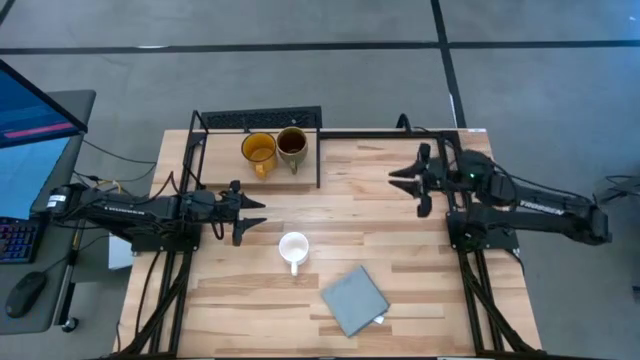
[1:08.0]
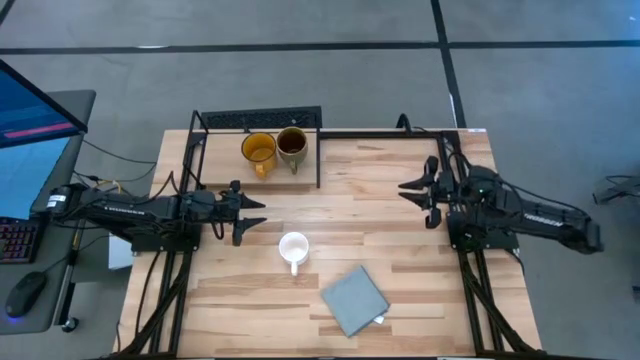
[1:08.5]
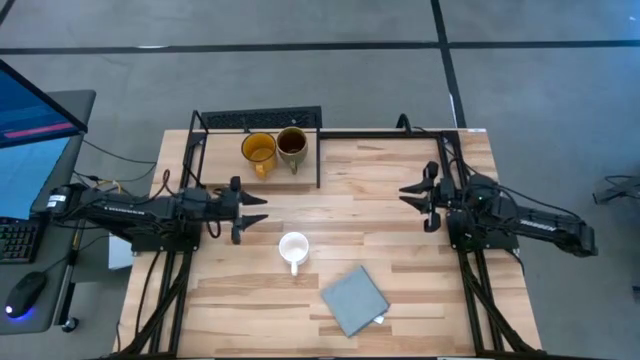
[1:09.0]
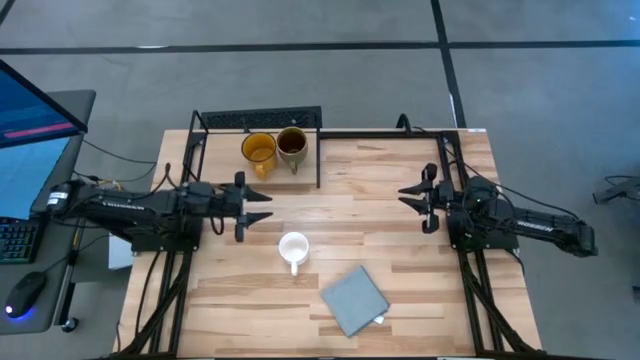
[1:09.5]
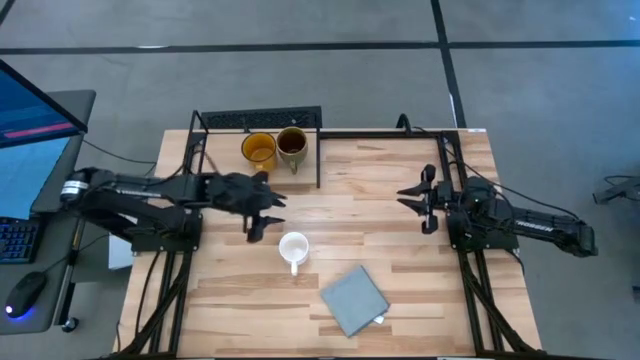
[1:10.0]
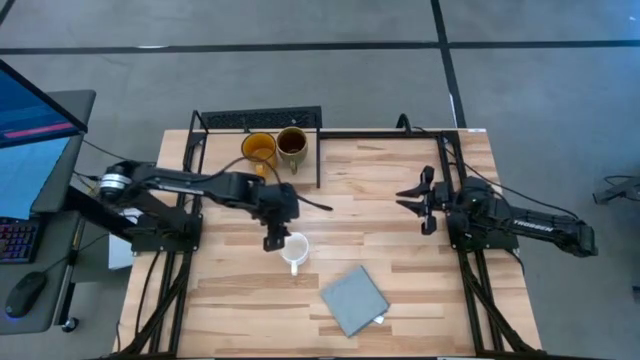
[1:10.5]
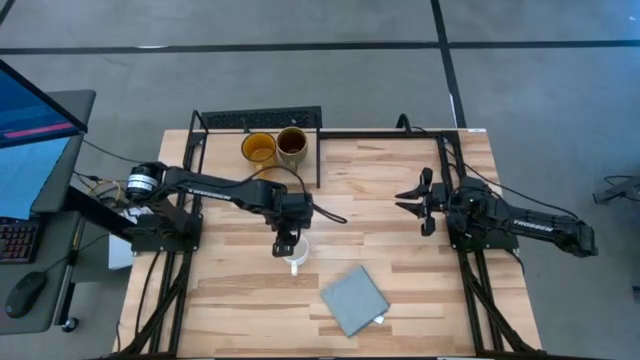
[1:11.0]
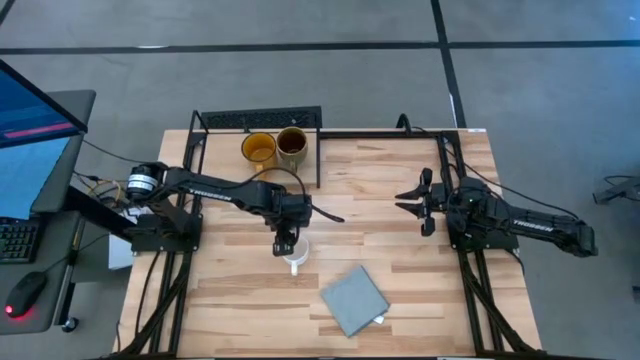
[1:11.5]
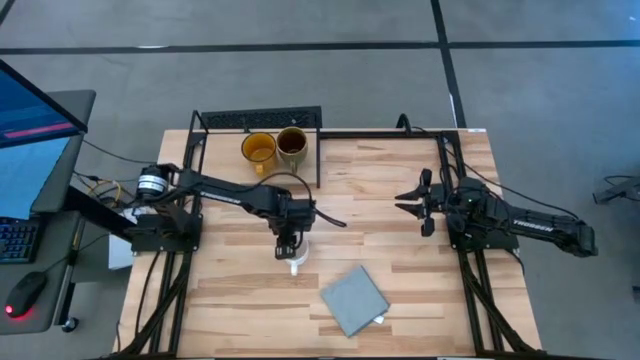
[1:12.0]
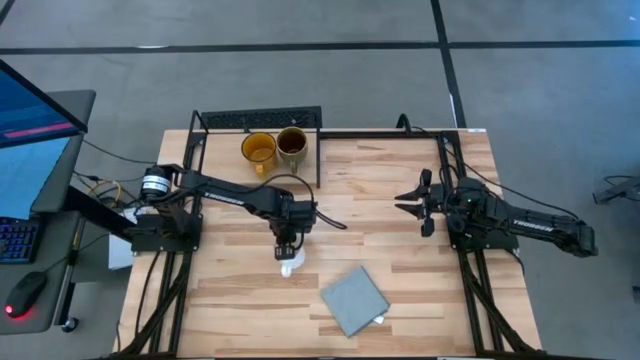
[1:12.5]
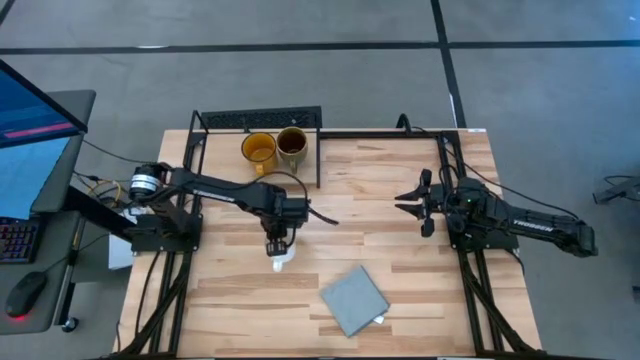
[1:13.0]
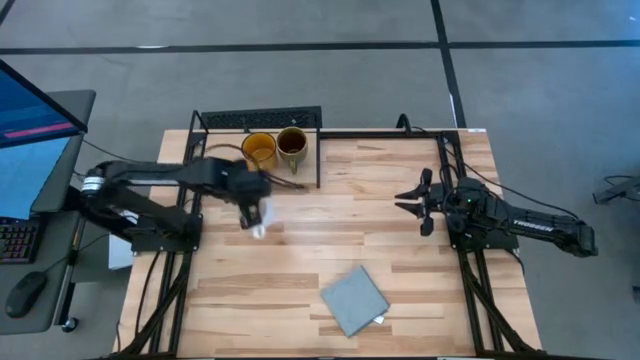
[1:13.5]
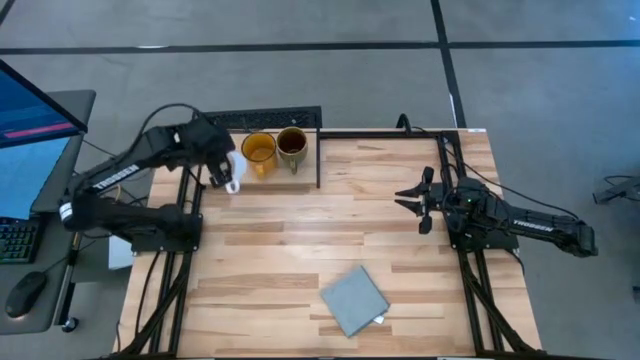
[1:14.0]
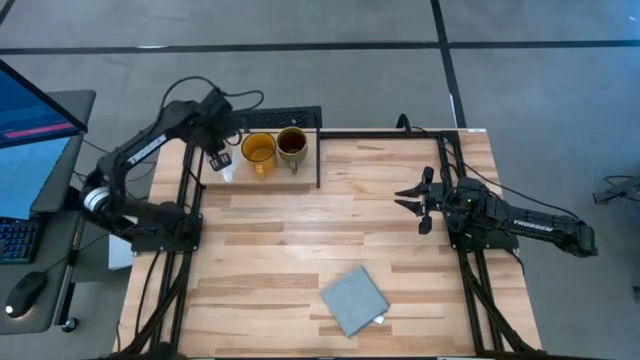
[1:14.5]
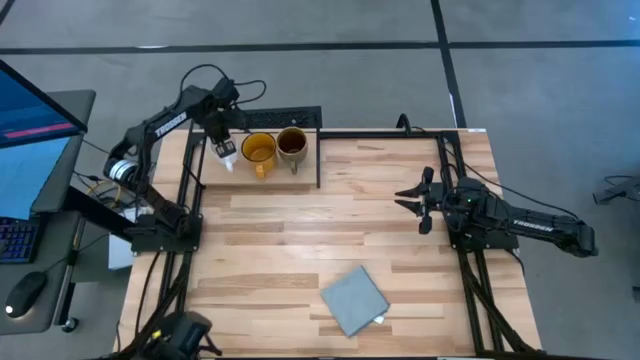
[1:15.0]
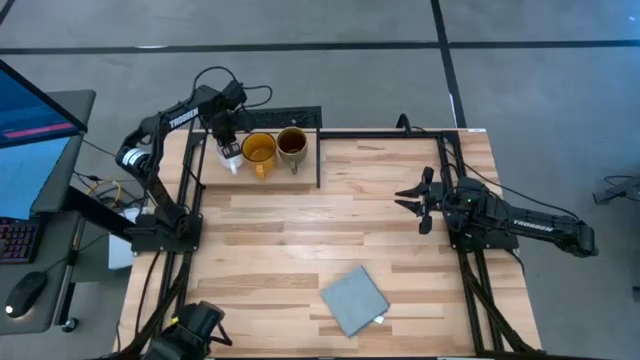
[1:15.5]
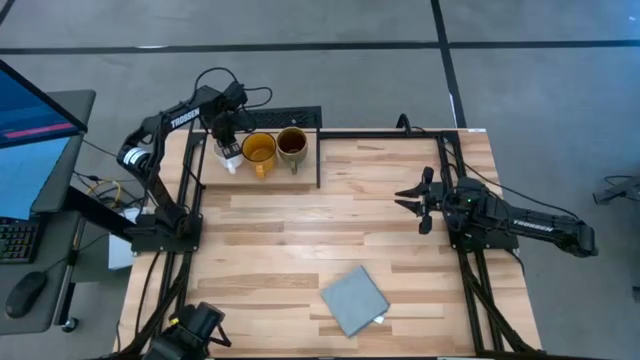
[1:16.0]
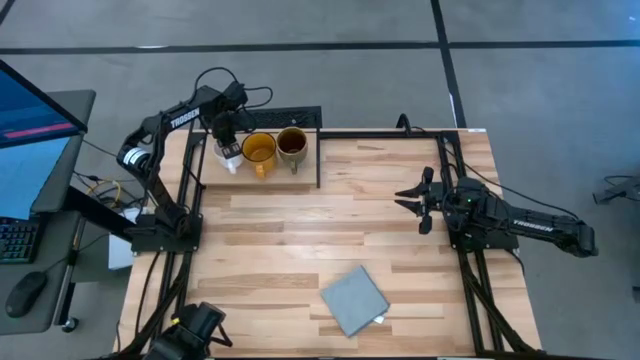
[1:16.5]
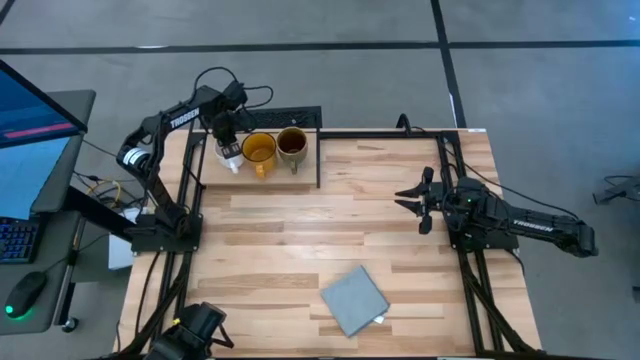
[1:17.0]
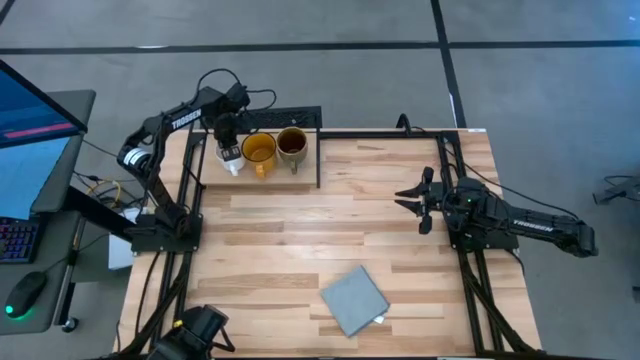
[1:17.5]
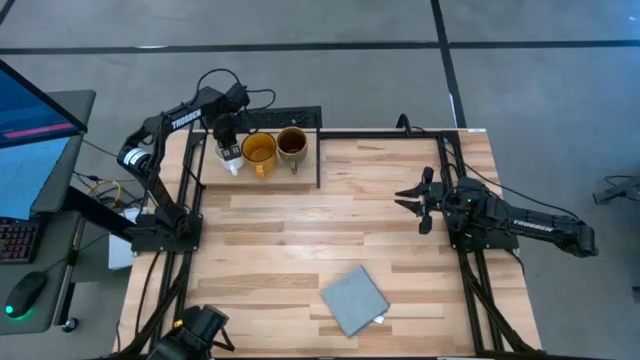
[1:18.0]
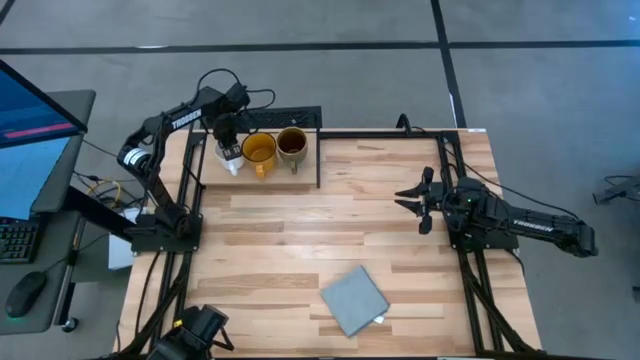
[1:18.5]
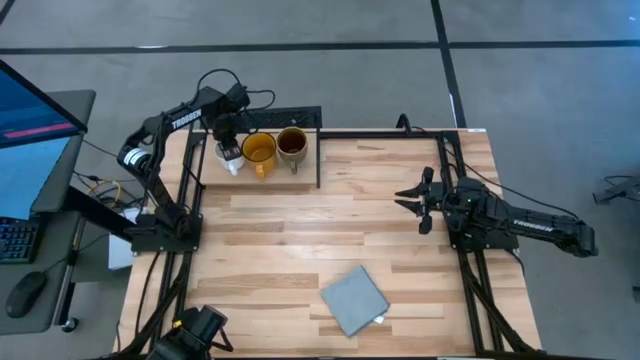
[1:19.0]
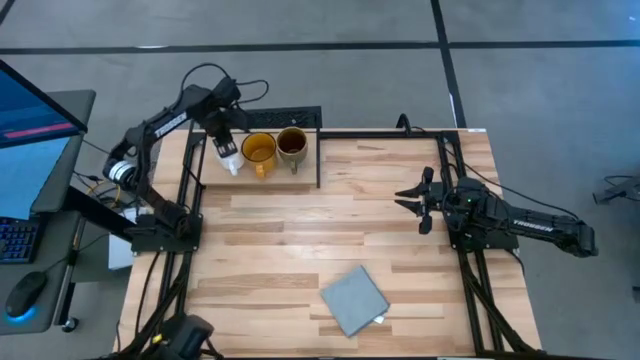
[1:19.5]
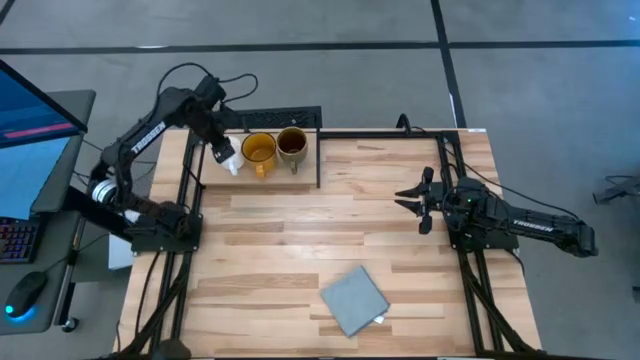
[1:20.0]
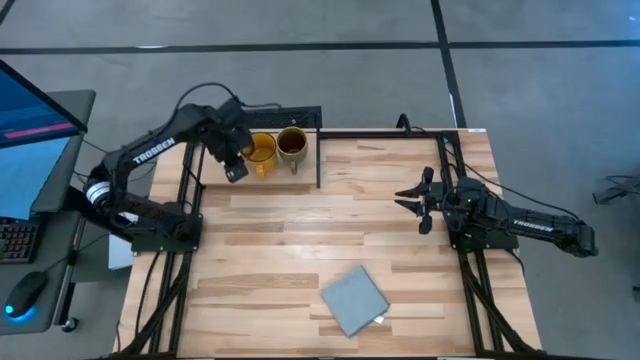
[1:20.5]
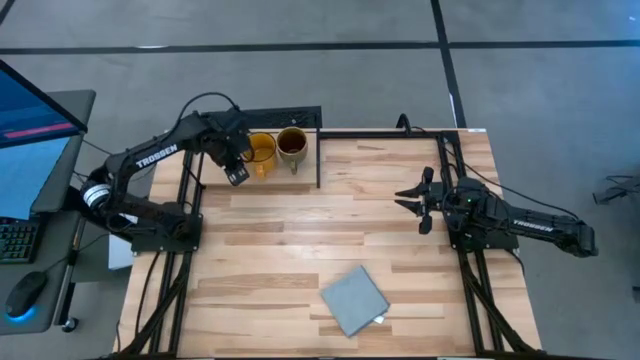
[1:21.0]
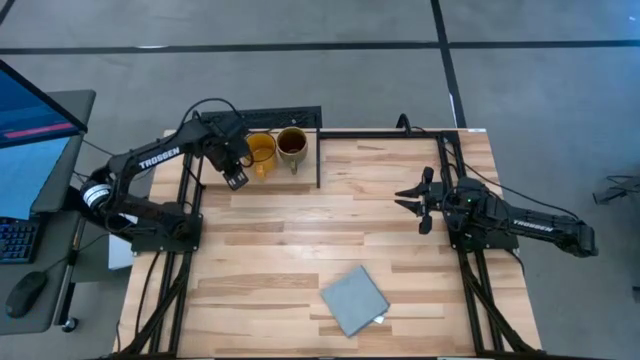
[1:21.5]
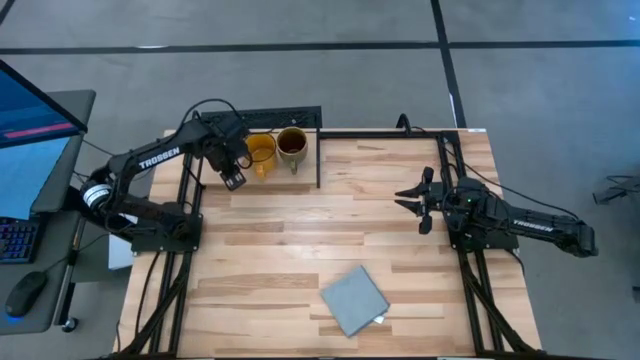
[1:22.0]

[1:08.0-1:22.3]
Task: Stack small to large cups/mugs on shelf
Put the white mug on the shelf

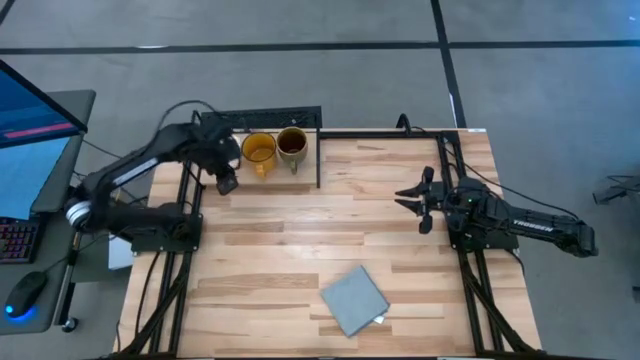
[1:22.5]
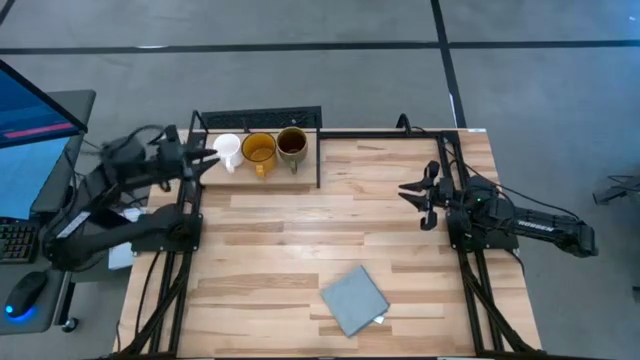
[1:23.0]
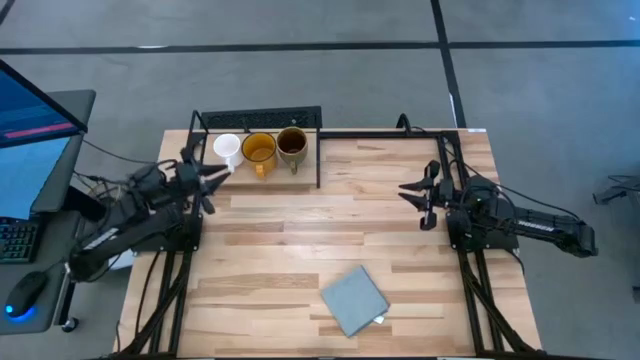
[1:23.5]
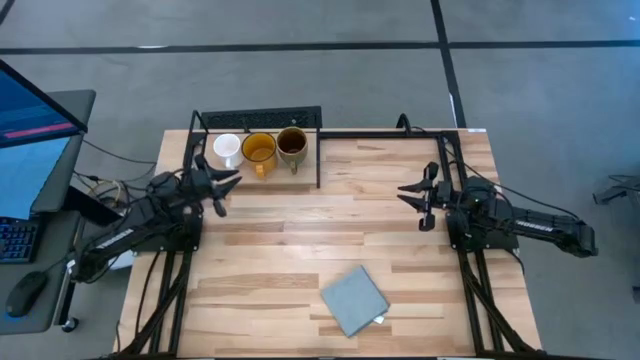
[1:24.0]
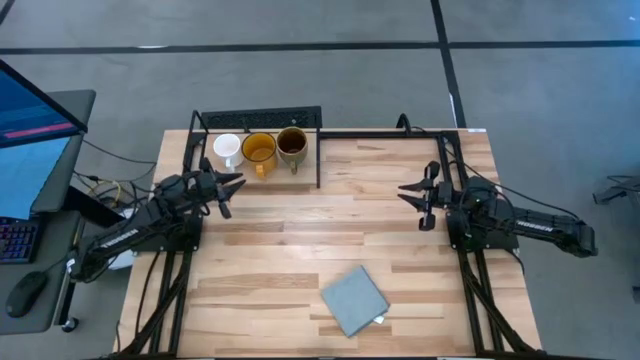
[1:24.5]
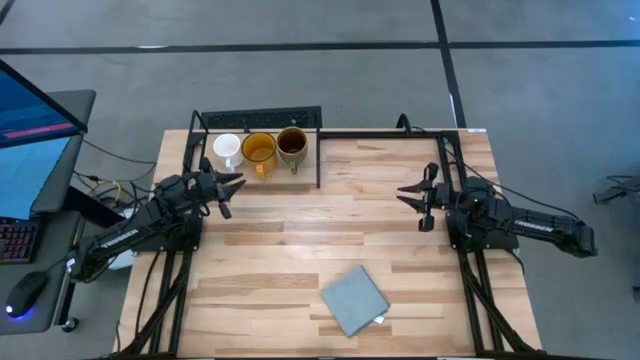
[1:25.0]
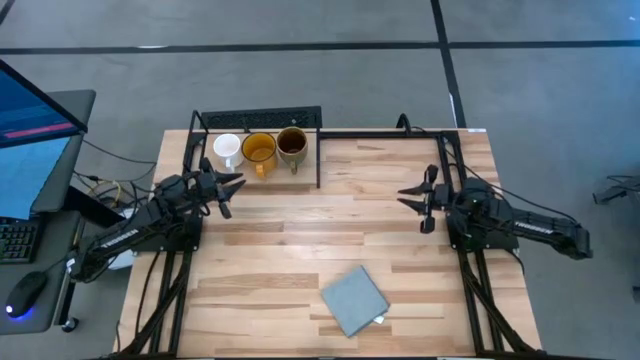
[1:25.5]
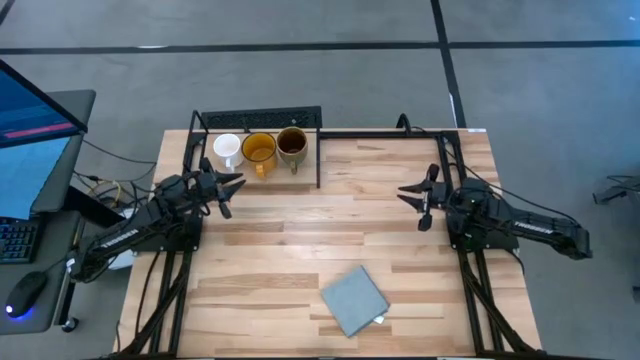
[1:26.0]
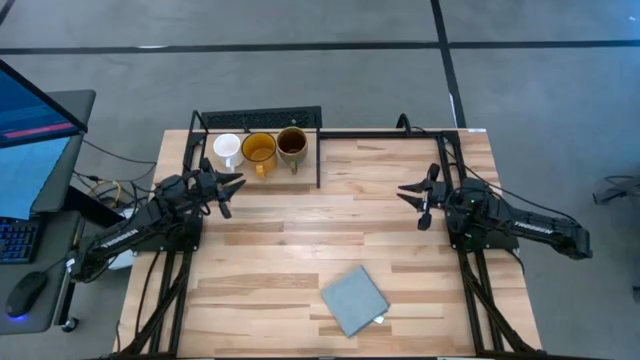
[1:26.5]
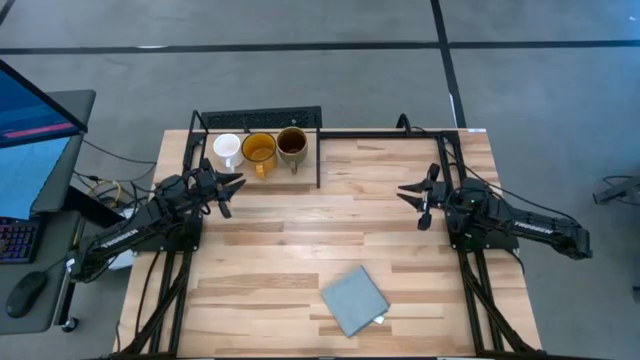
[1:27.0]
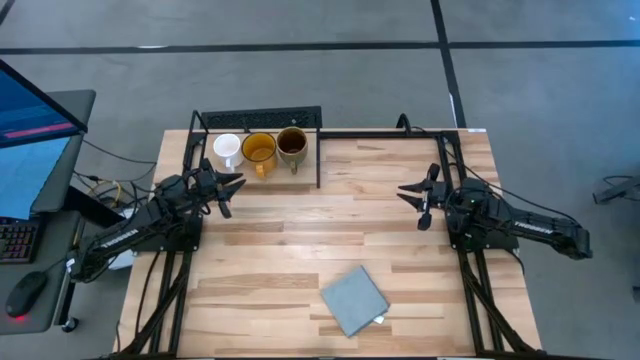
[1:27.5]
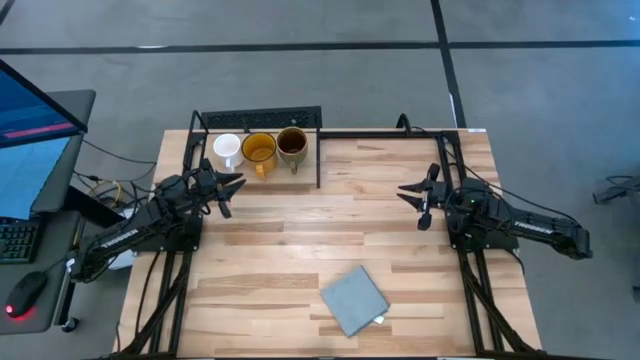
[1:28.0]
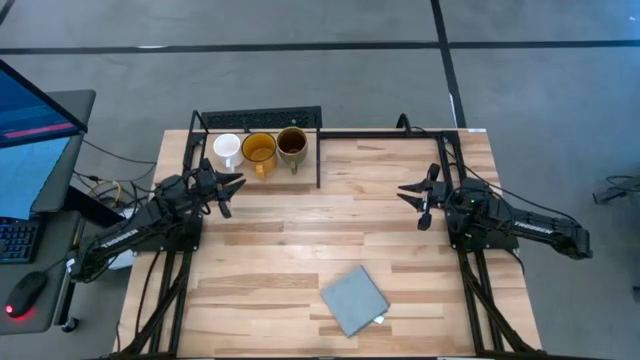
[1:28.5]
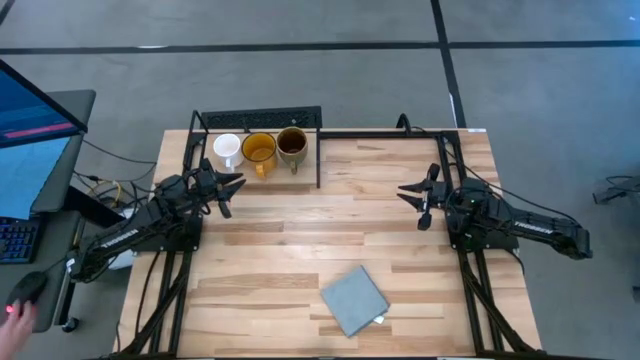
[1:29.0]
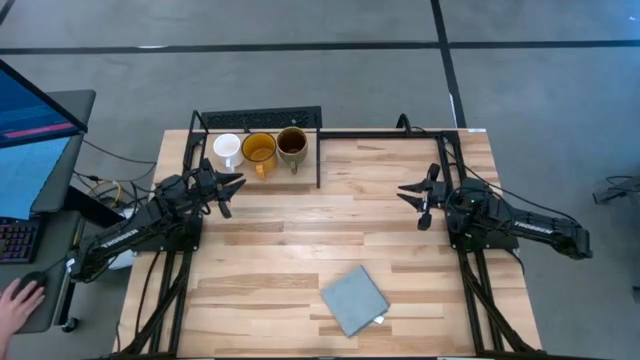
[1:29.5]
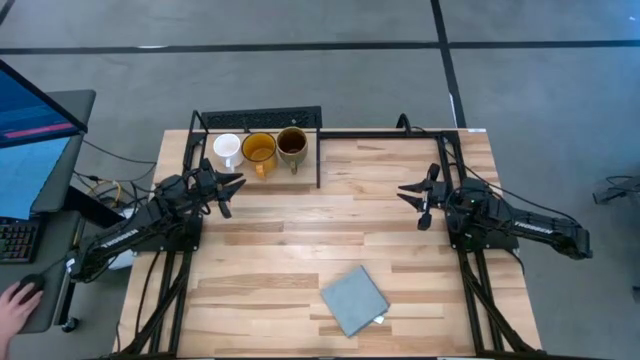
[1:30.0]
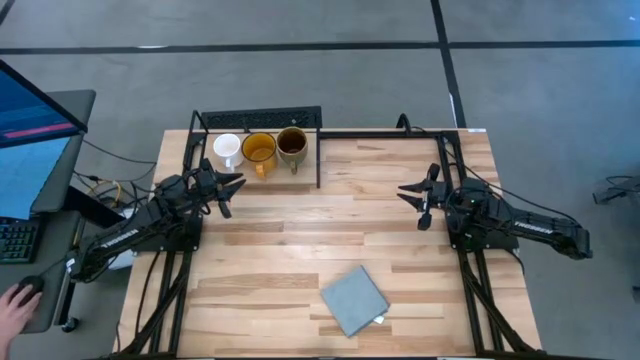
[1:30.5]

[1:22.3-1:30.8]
Return to Home Position
